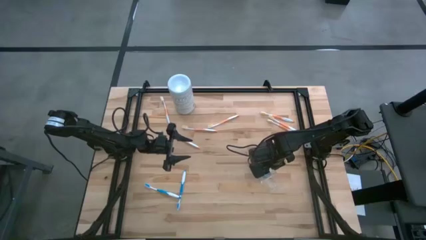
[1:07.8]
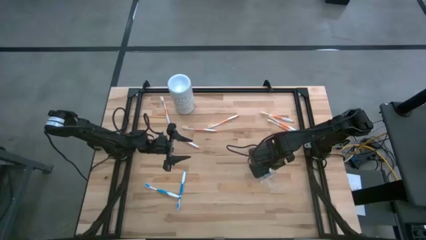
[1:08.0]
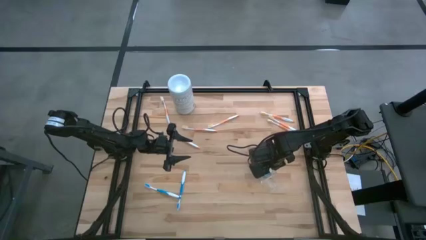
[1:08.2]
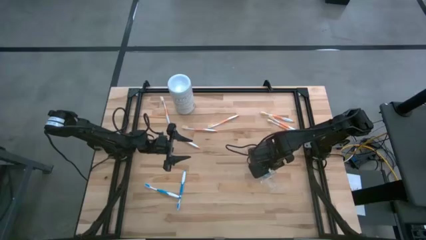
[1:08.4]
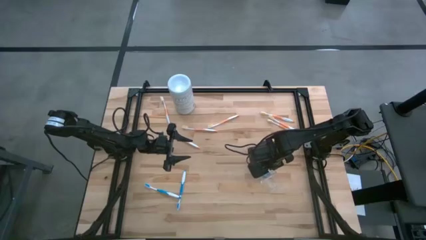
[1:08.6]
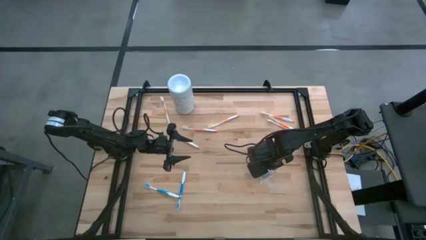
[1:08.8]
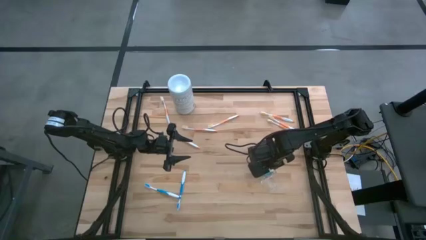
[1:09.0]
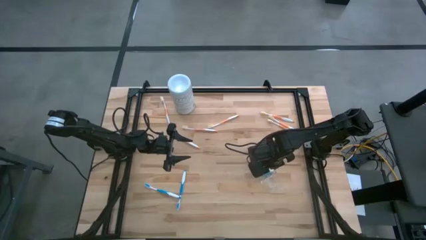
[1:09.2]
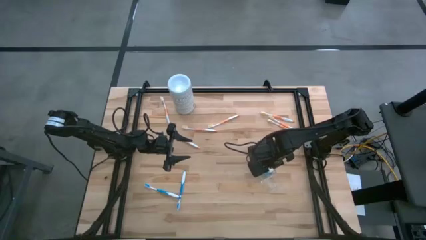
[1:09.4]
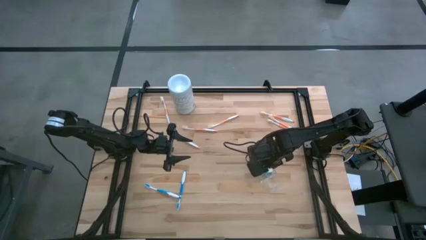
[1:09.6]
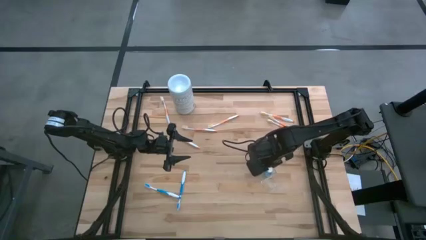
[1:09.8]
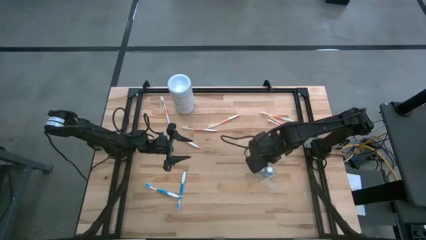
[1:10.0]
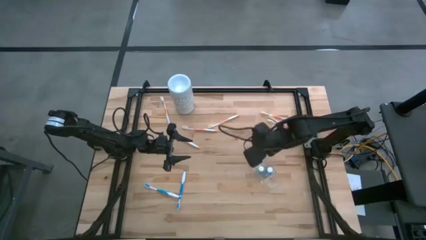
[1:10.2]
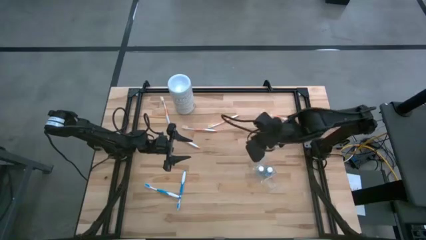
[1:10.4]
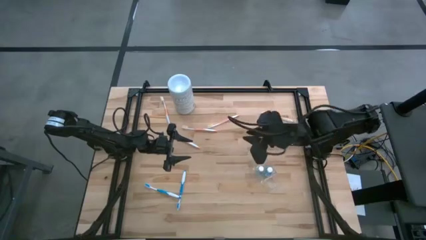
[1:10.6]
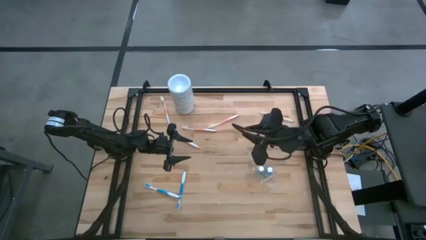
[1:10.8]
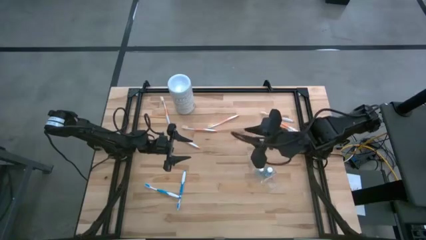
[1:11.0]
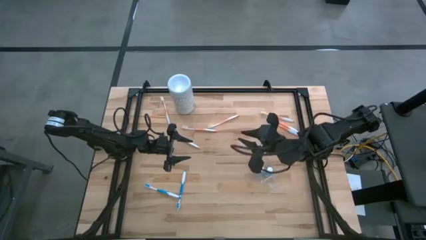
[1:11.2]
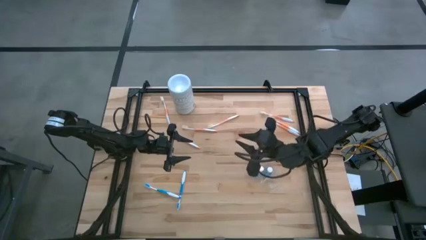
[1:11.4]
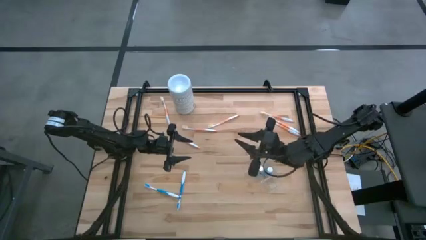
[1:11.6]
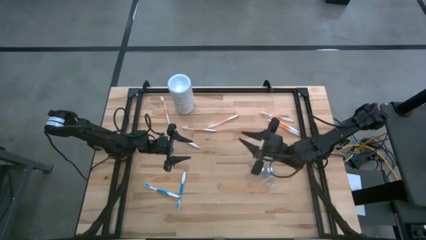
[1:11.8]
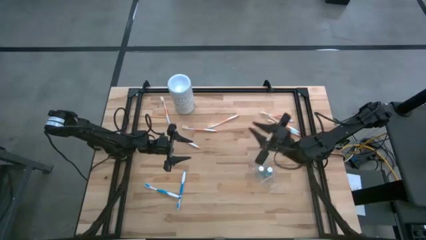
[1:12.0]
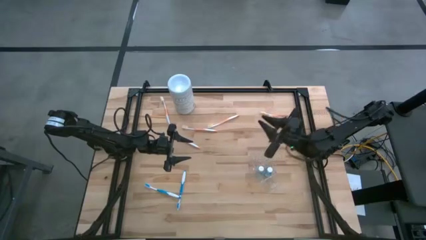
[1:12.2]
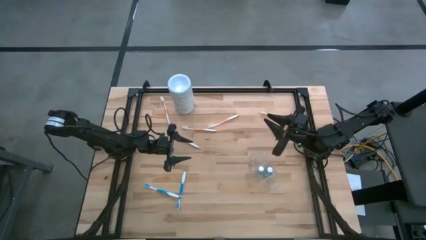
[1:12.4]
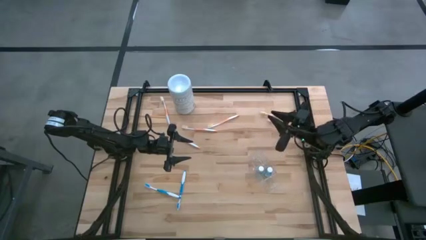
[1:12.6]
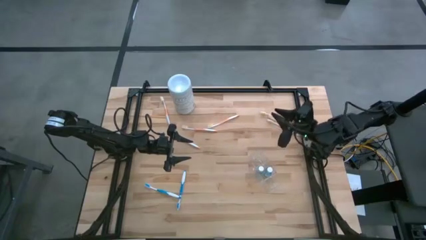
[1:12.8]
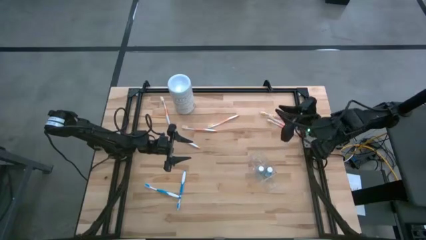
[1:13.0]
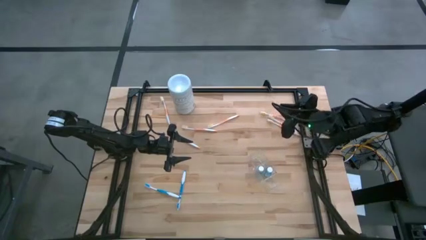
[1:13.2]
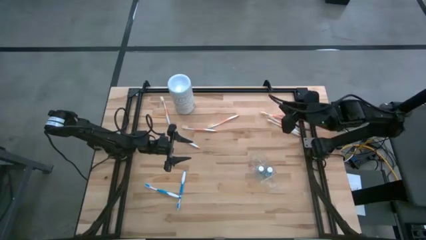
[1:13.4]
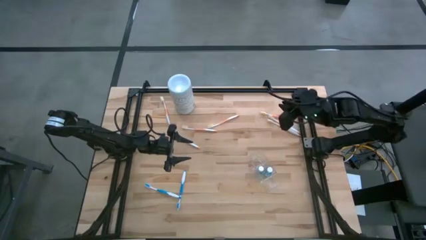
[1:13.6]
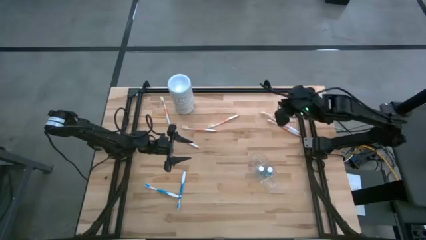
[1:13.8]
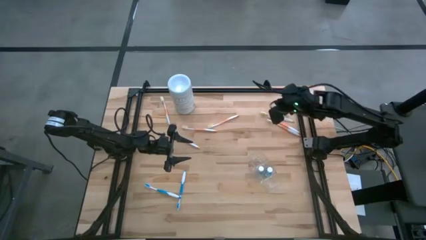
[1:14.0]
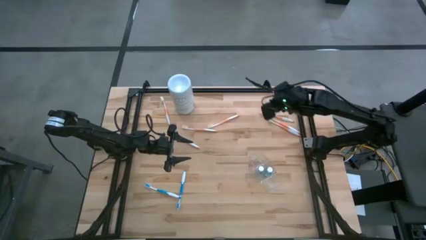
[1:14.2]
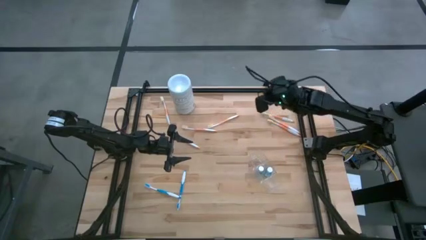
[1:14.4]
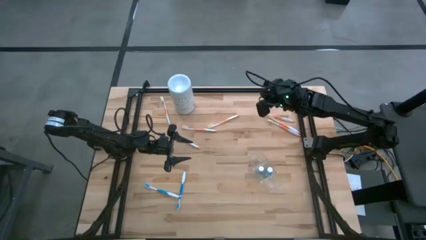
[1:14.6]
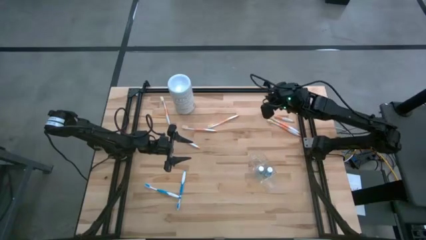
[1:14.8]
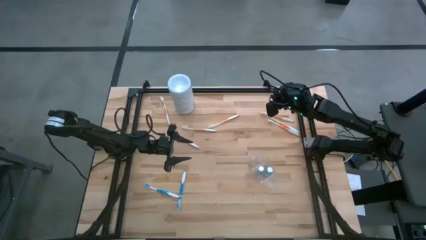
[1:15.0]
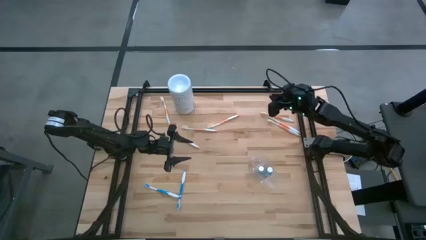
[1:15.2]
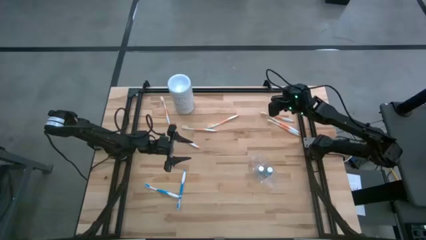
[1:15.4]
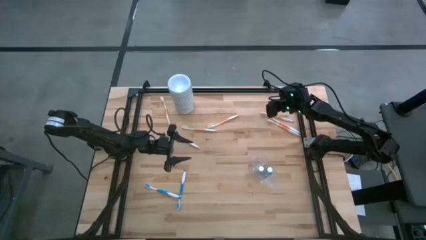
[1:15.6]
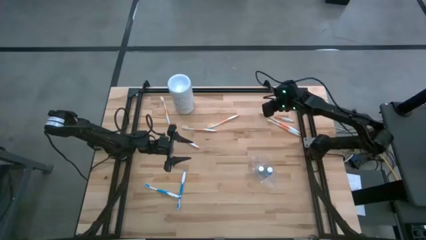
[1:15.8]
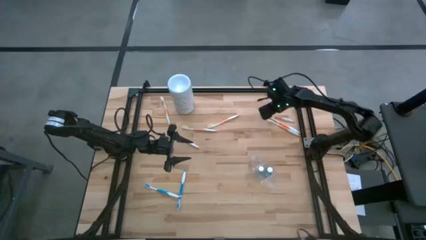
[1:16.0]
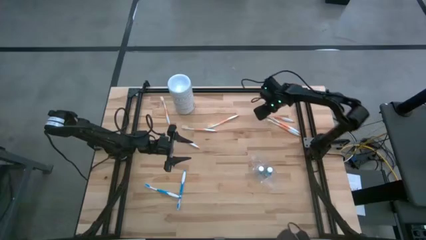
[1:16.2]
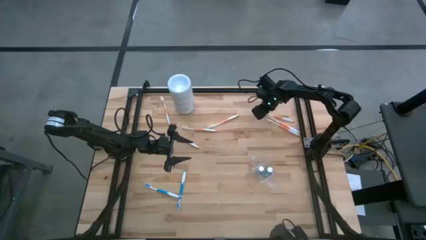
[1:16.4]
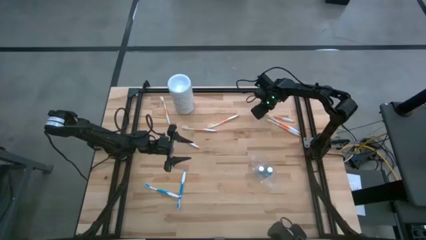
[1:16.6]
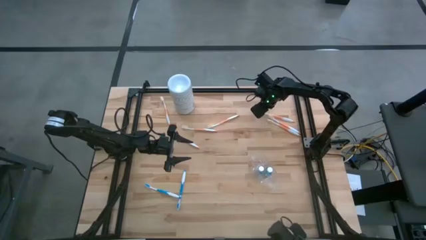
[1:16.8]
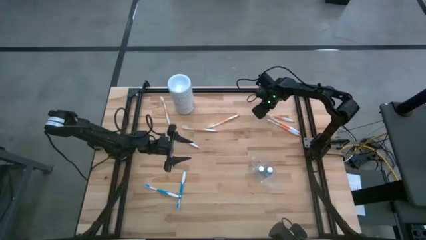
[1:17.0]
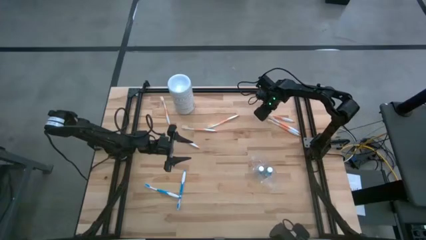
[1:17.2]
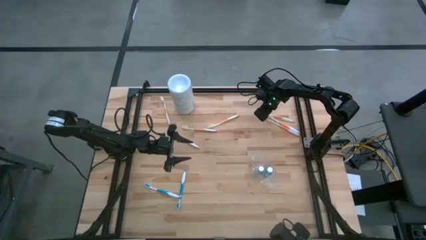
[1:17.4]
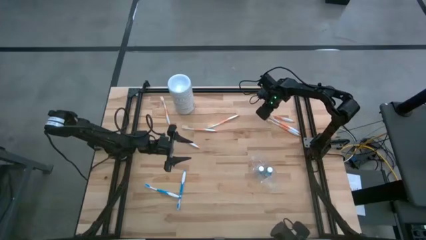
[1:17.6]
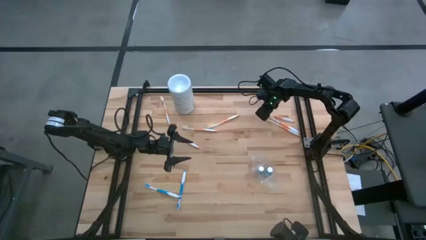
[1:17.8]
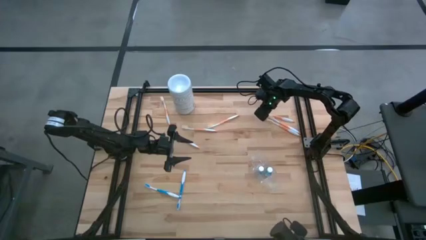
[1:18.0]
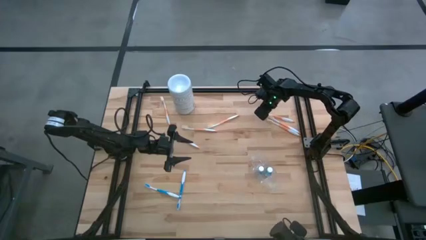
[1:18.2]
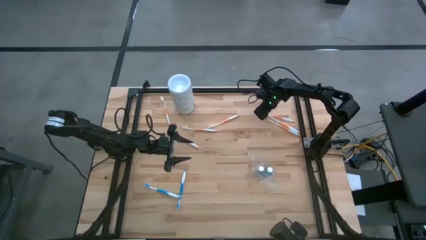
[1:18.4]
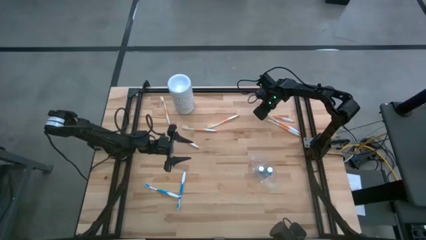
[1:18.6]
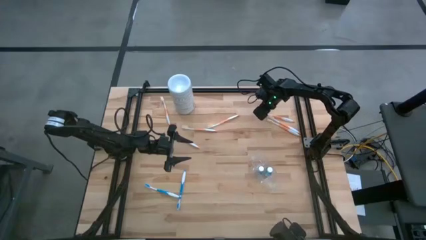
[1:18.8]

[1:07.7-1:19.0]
Task: Pick & Place toothbrushing station
Put the orange toothbrush into the top section of the transparent organizer

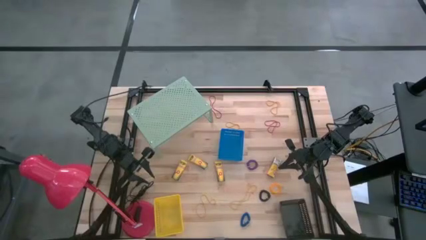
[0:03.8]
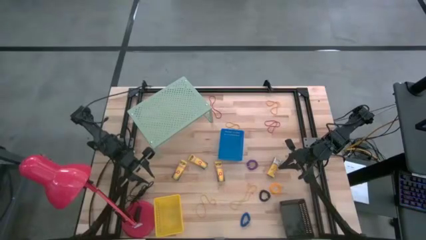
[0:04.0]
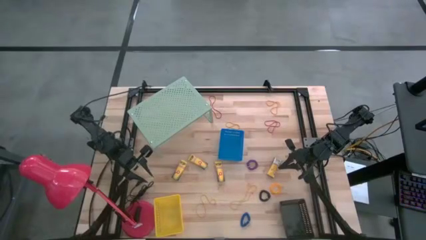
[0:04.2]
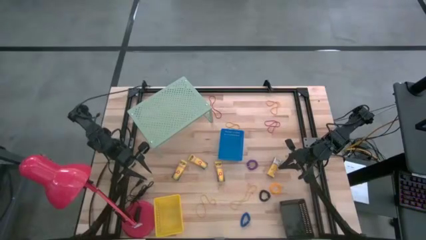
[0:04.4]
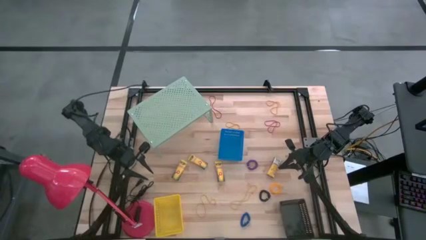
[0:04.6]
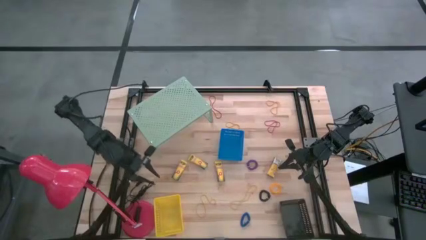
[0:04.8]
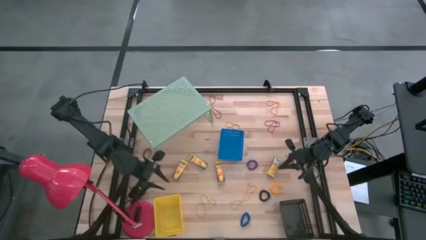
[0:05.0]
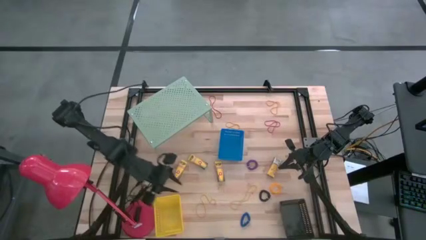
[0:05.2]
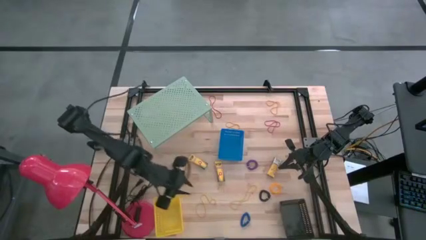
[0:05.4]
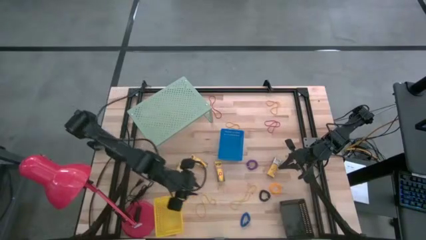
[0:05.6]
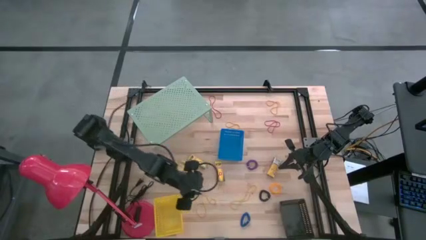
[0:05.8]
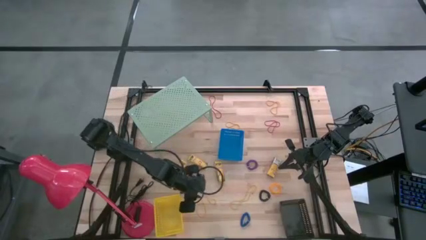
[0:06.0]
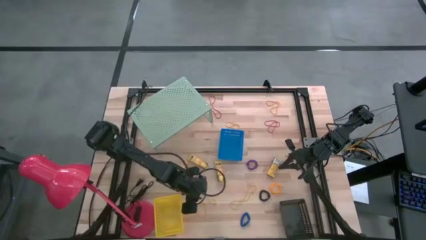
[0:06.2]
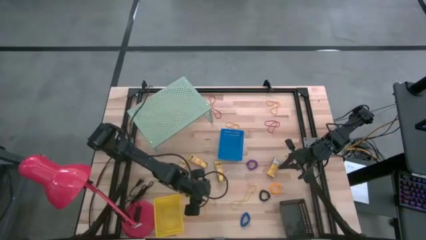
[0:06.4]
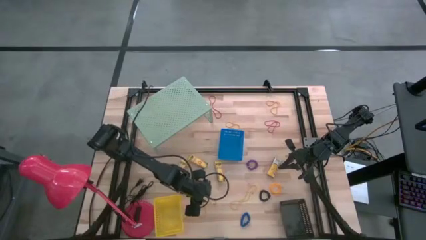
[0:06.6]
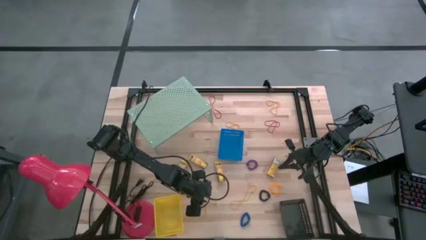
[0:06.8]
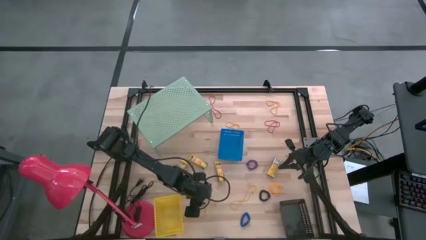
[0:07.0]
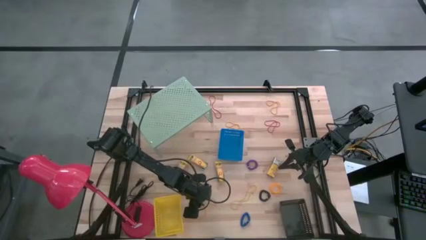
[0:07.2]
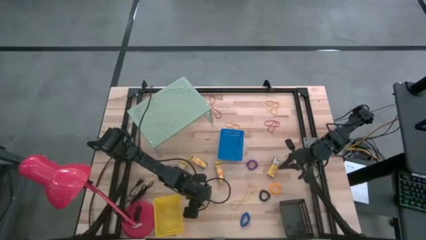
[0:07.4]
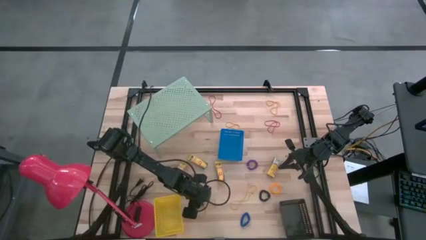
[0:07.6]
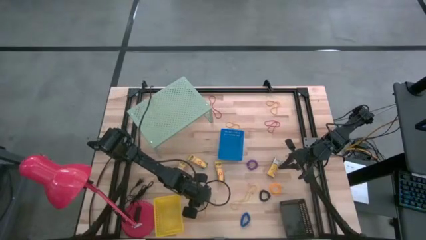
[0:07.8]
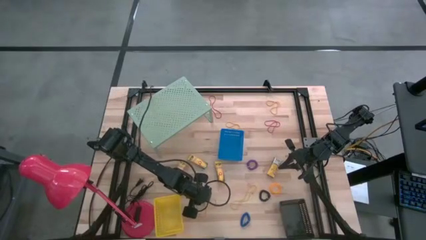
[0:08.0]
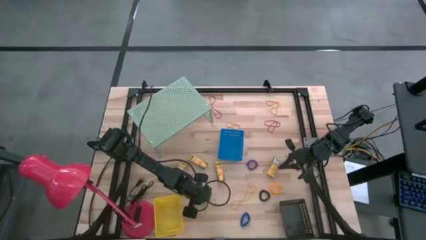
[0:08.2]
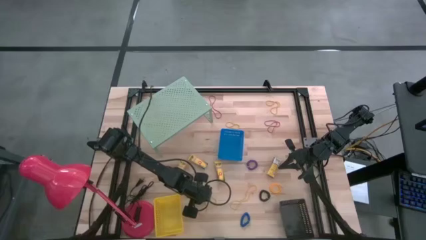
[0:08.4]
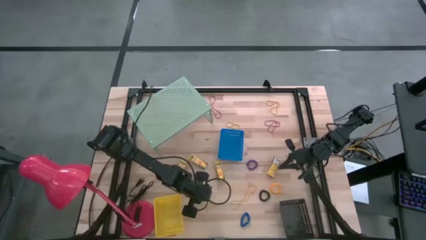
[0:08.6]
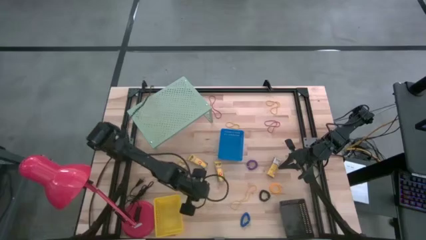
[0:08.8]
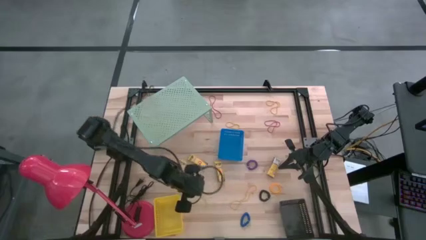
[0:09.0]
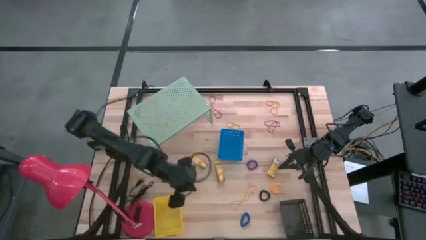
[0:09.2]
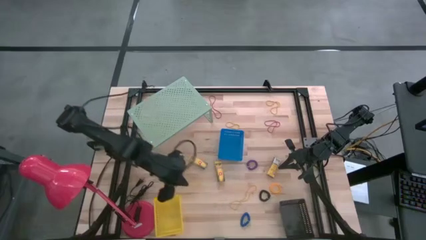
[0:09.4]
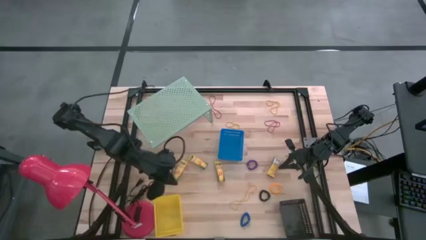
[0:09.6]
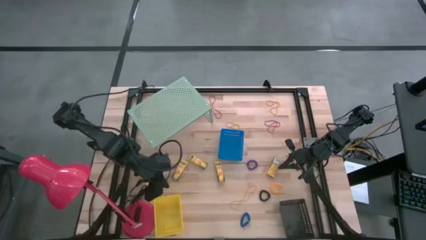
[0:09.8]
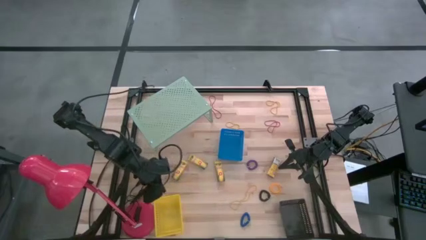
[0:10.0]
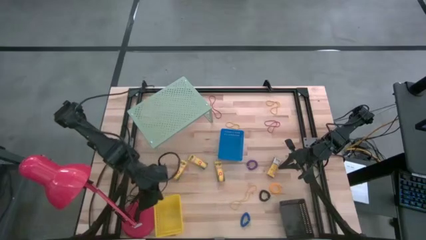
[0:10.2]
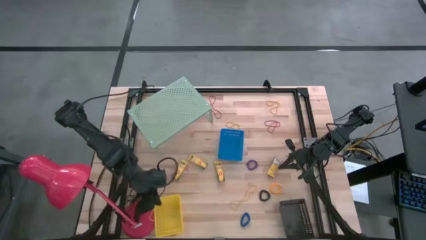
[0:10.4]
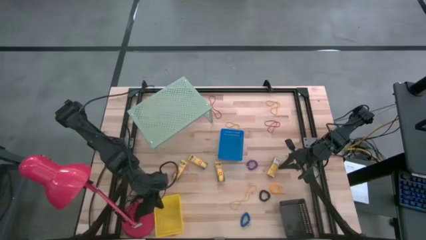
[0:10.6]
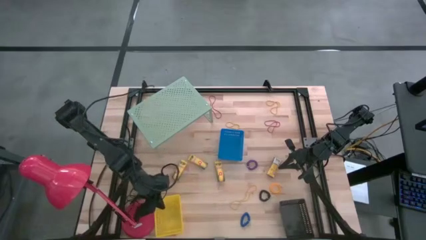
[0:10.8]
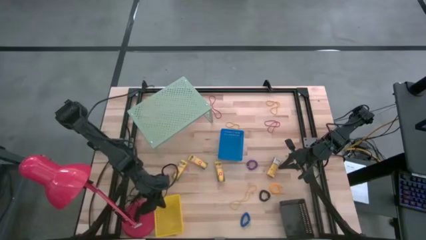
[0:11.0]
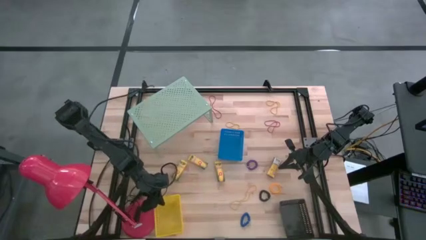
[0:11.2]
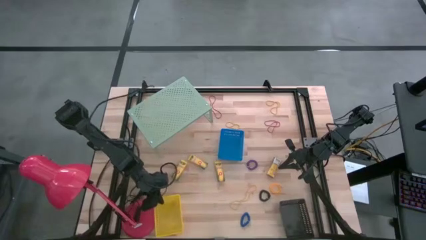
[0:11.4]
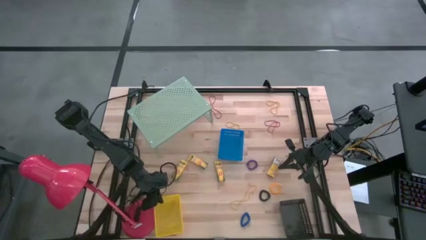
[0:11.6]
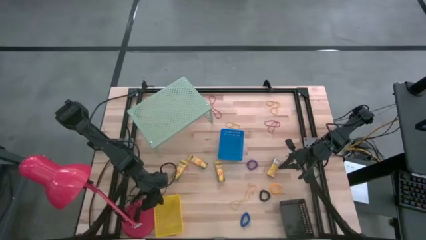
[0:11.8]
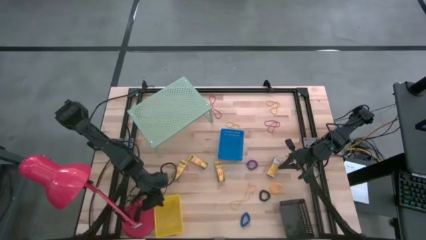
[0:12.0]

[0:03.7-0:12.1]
Task: Pick & Place Office Desk Supplies
Put the yellow rubber band into the yellow basket
